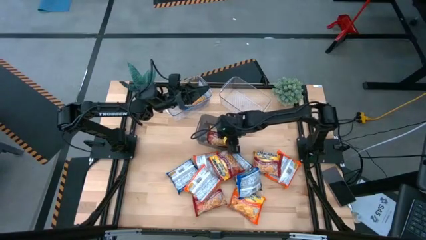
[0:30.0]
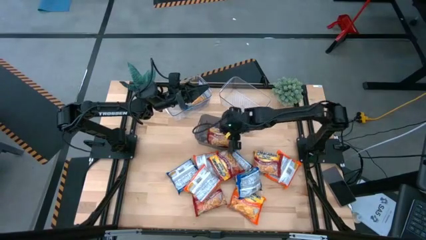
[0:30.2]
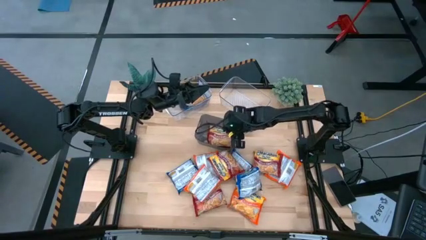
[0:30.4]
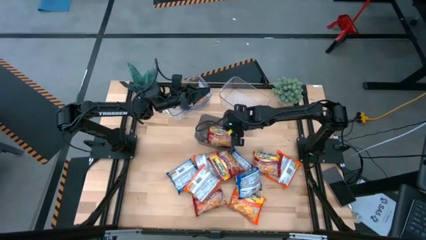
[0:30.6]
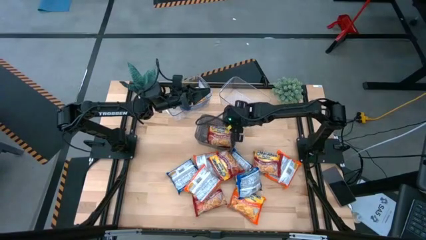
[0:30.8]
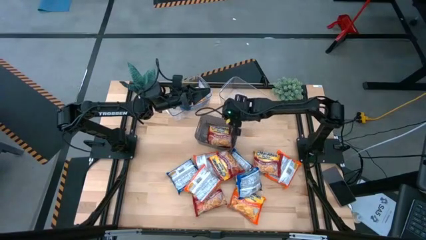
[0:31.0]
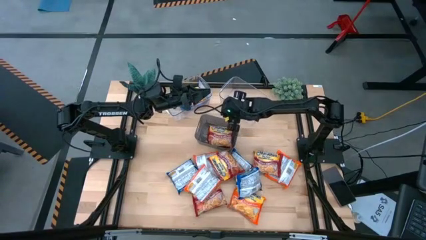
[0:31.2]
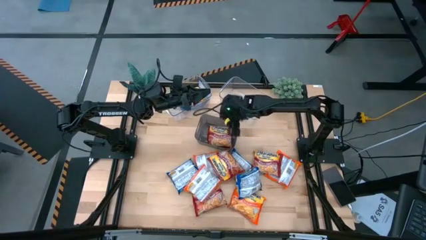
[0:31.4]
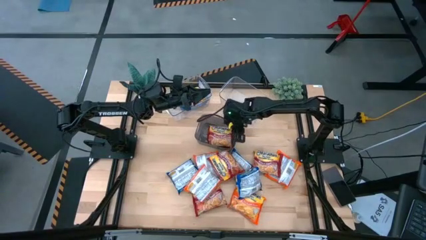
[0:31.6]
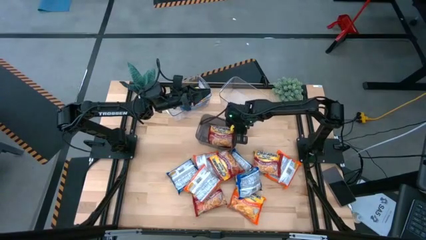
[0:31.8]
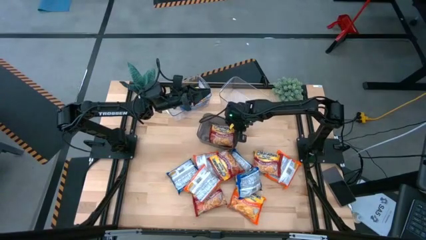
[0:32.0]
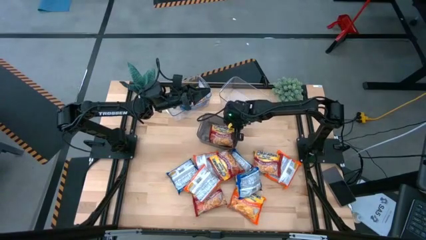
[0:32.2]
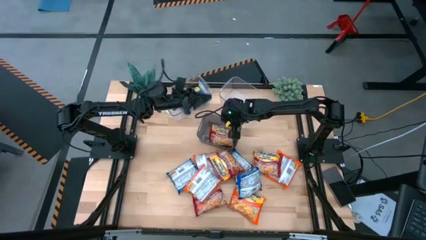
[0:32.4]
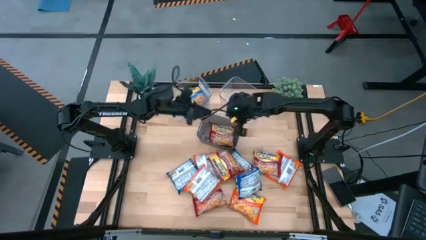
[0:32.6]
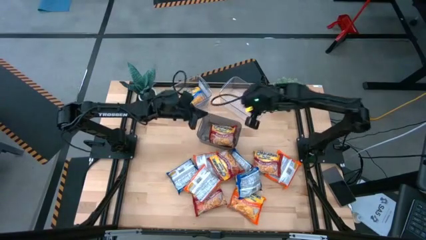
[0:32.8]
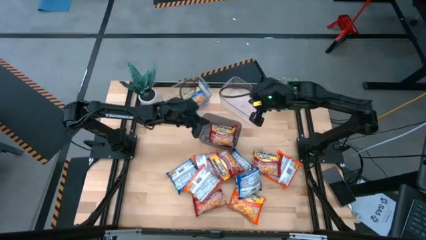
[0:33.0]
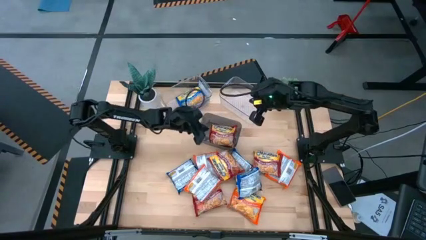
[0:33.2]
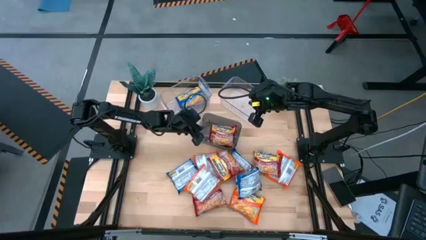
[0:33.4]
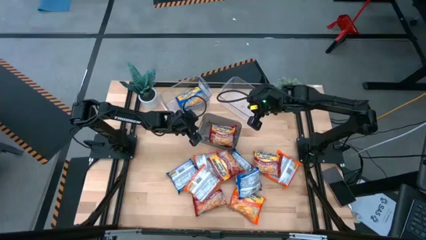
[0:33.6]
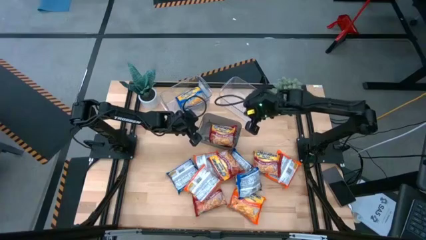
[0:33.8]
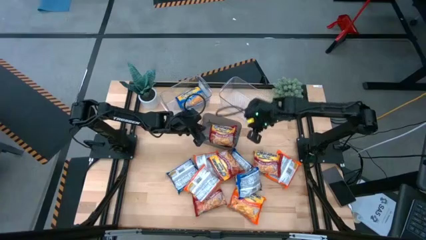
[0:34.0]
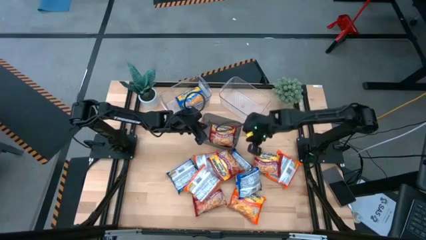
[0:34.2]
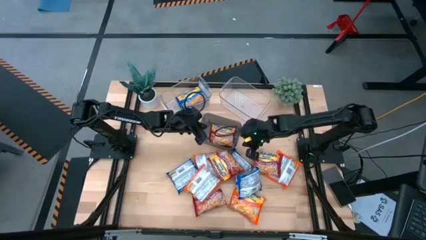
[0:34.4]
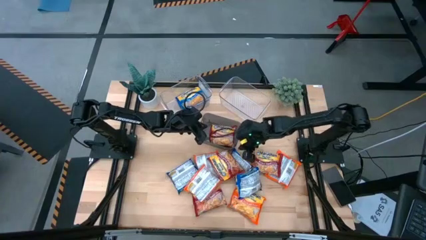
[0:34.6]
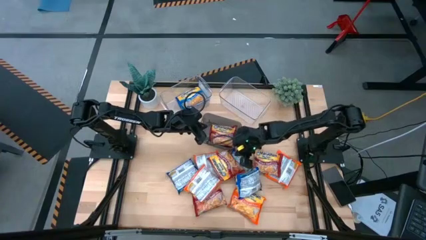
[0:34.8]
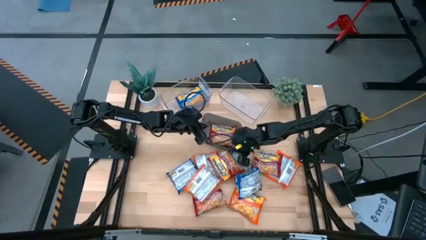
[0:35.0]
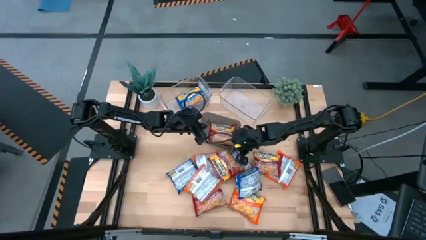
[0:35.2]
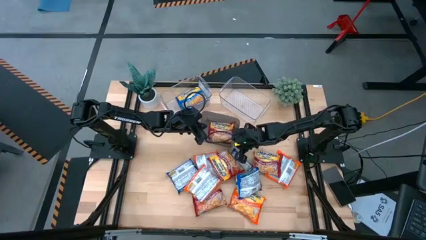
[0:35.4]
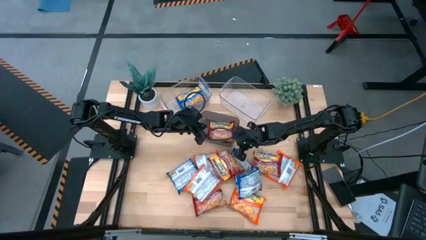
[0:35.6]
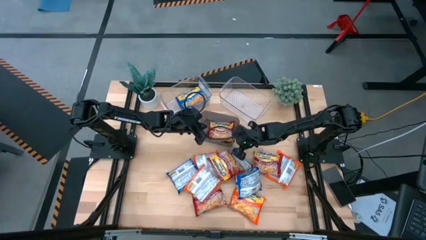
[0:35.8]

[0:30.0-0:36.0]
Task: Sort Maruchan noodles
Adjust the gray bin on the table

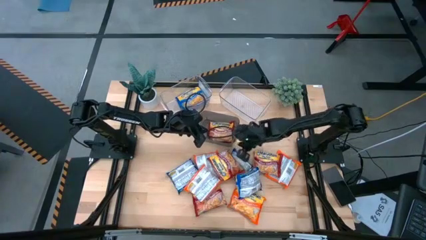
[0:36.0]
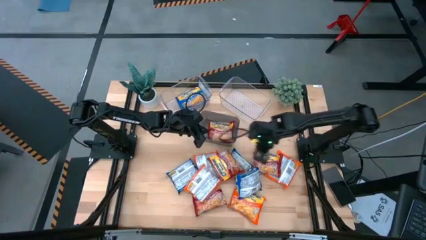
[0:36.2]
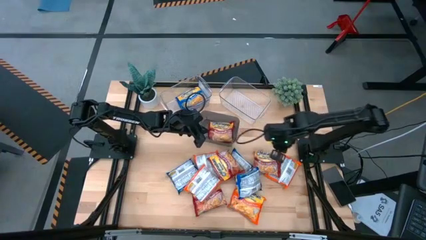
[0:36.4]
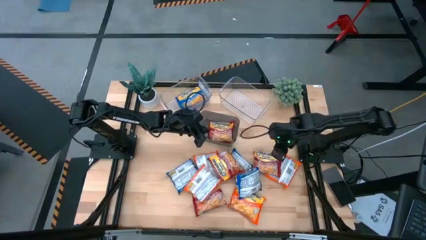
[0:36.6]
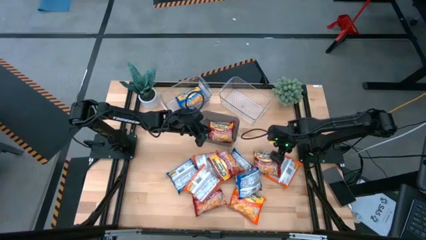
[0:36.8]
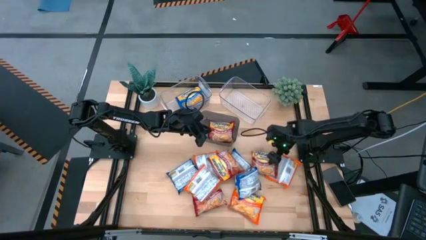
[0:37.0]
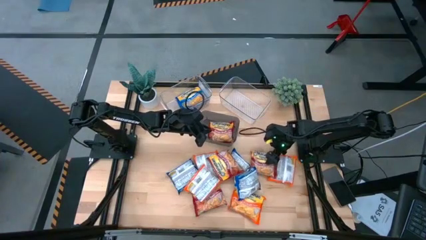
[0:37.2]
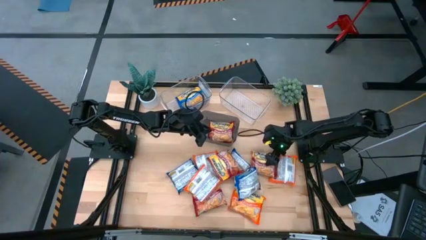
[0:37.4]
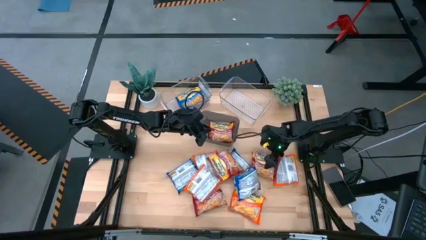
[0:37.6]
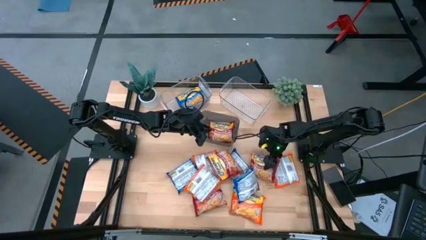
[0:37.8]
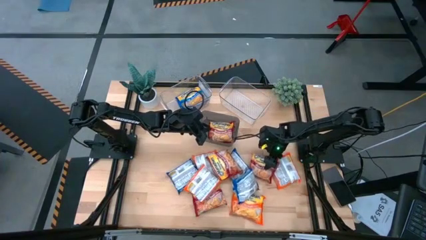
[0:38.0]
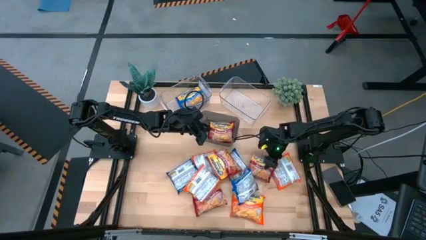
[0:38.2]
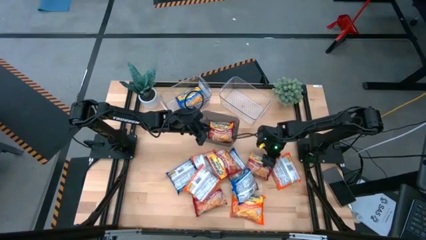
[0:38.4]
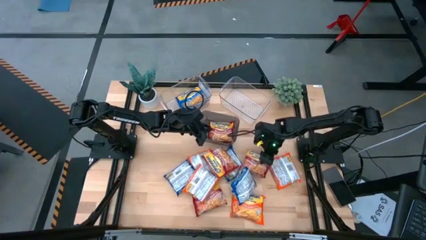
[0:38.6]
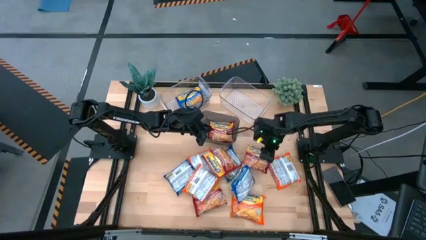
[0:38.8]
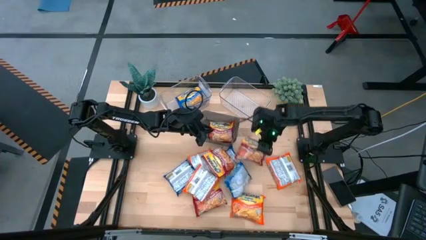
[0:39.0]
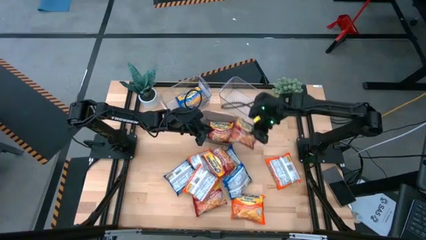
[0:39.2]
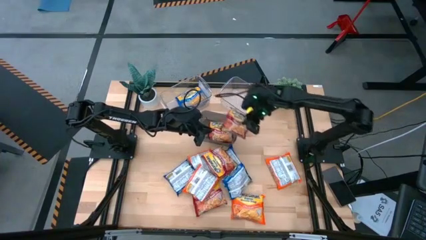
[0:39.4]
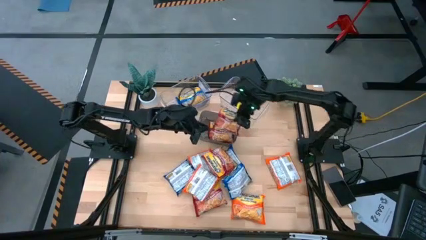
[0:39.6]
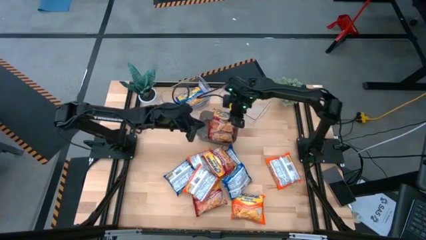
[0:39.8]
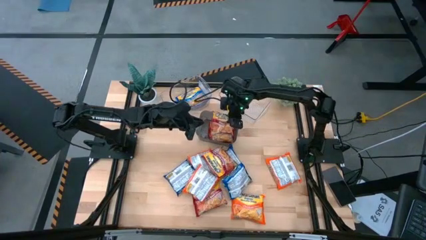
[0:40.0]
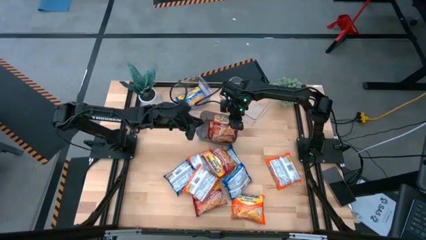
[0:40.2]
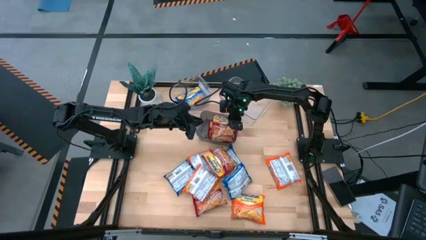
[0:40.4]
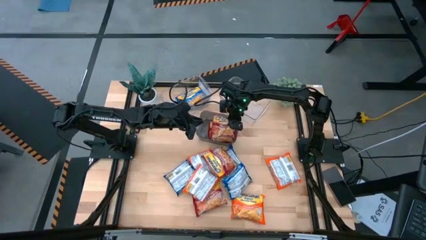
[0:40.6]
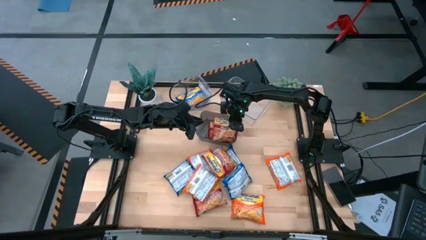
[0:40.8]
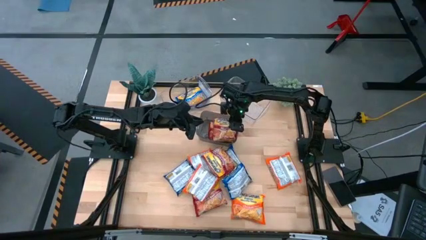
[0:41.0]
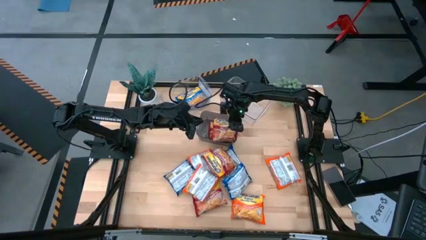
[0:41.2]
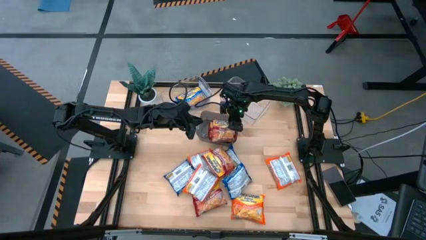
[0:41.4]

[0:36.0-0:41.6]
Stack the red noodle pack on top of the red noodle

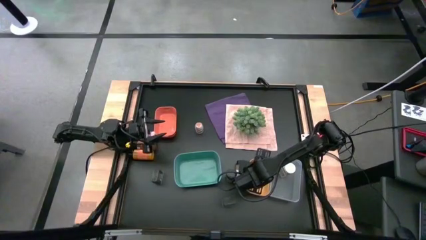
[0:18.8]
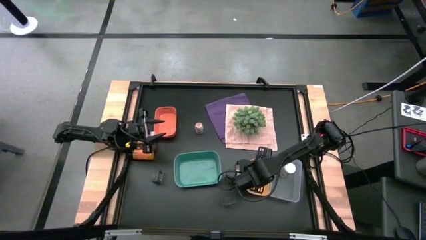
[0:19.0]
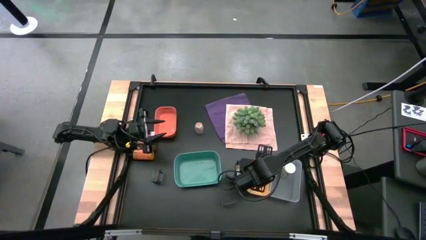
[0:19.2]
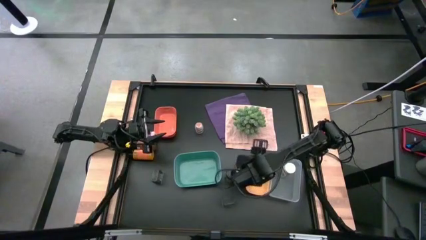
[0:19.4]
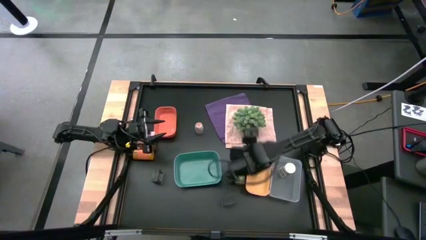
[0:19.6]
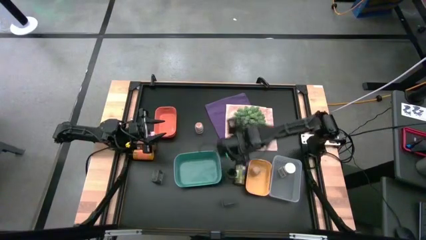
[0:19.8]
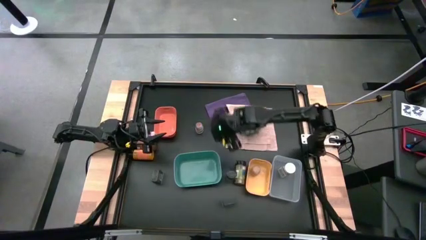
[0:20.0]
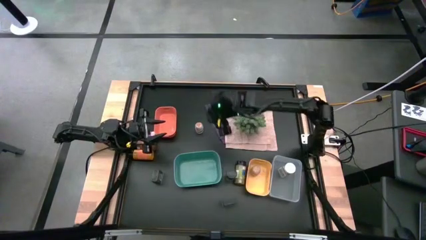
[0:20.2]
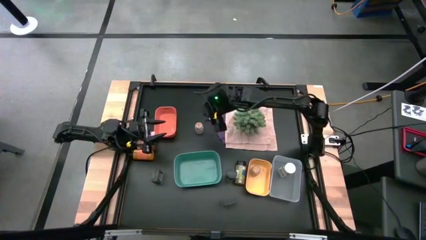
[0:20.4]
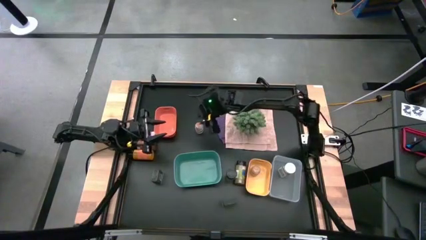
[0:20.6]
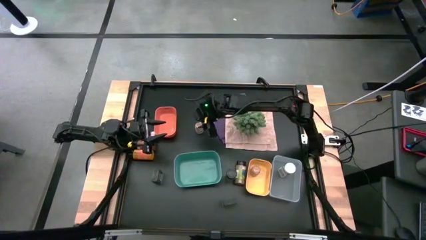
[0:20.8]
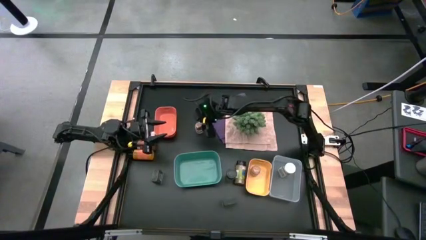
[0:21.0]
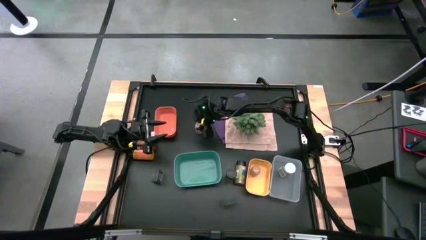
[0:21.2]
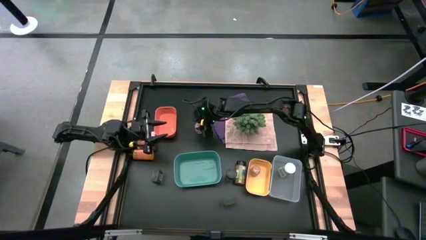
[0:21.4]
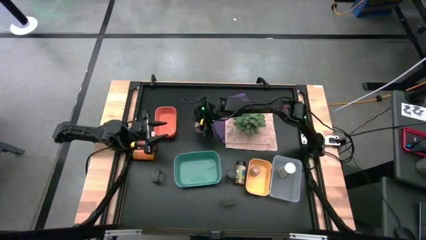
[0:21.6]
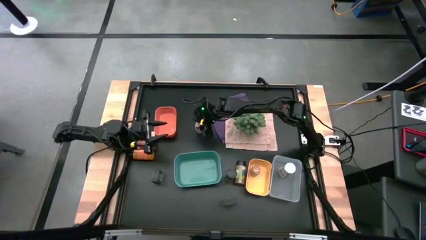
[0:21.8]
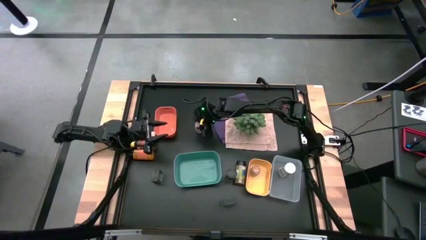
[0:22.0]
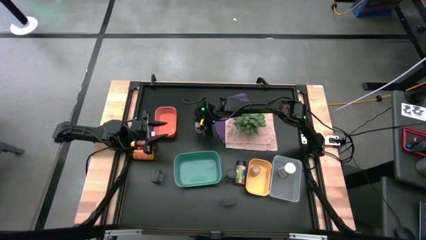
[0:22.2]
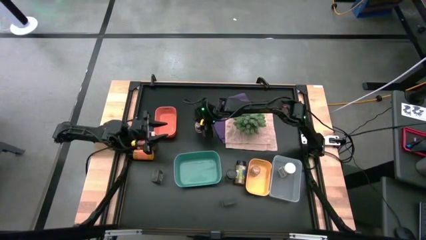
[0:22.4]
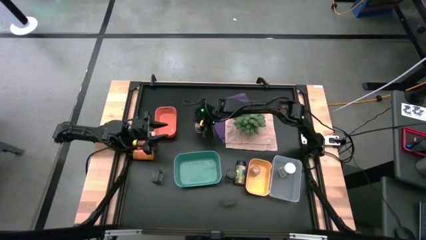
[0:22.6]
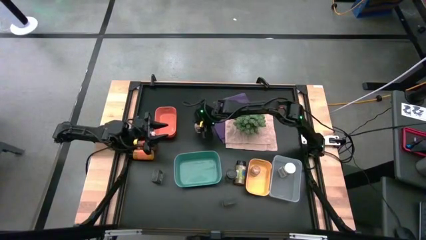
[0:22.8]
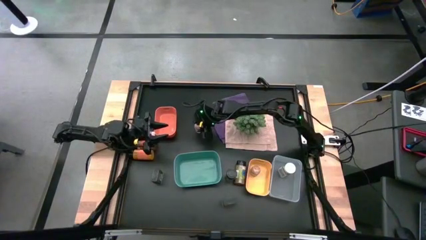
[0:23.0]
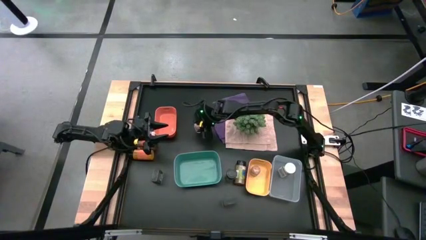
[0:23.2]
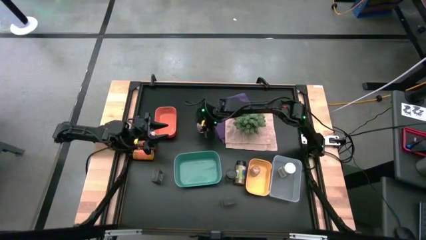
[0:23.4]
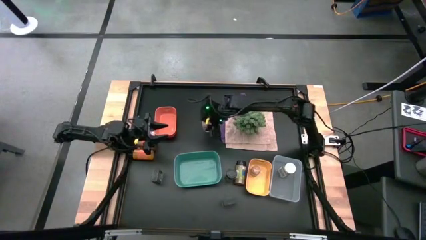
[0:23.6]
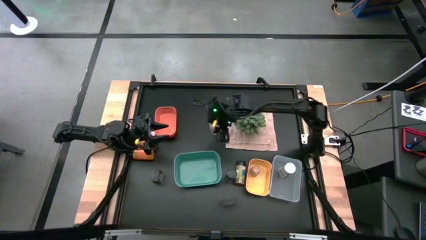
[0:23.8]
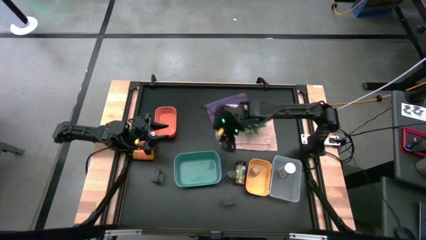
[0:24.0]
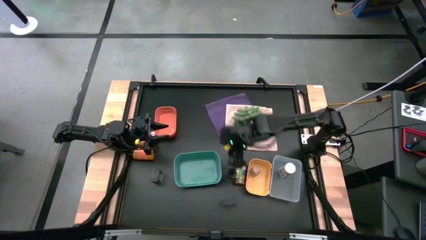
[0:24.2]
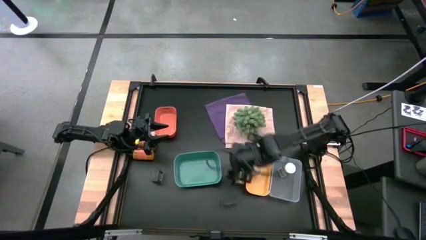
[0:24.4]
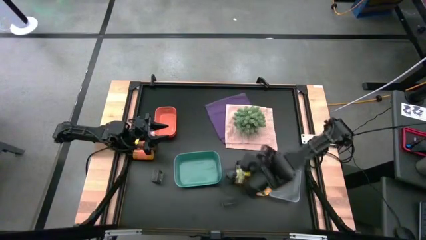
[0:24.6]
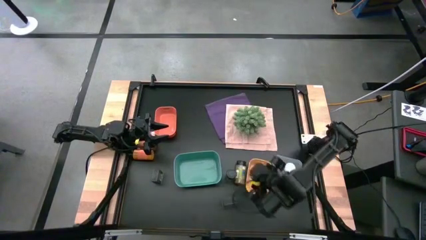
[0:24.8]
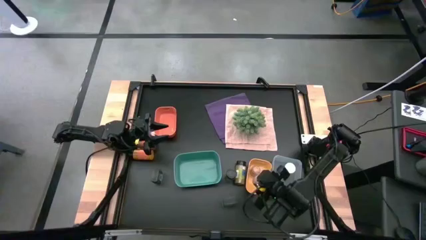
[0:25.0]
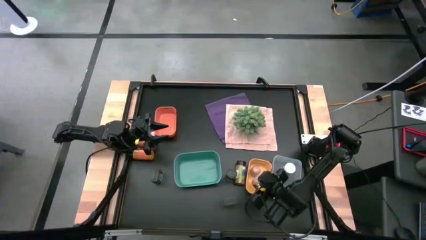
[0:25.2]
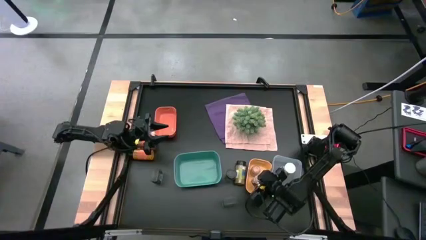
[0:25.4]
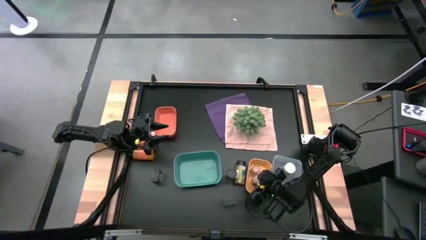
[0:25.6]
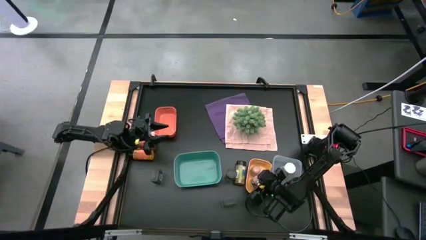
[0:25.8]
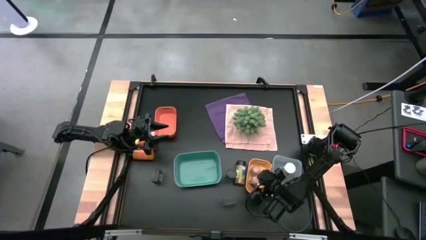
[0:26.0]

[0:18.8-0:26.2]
Task: Sort spices by type
Put the brown seasoning bottle into the yellow bin
